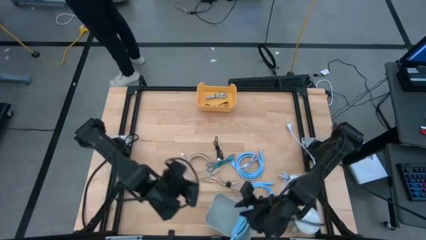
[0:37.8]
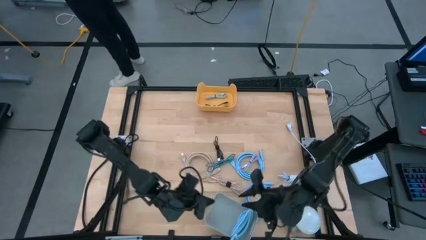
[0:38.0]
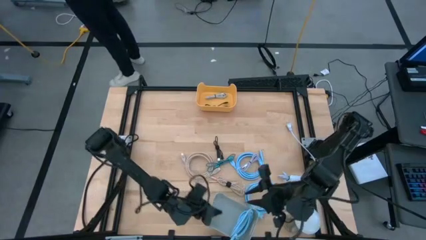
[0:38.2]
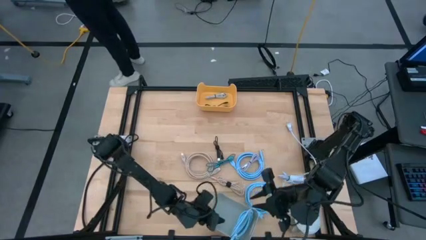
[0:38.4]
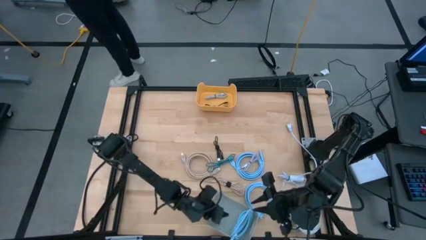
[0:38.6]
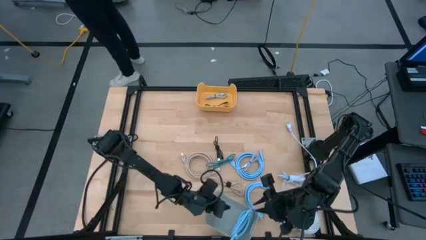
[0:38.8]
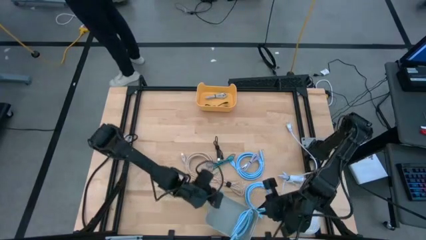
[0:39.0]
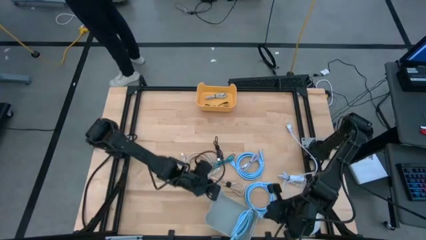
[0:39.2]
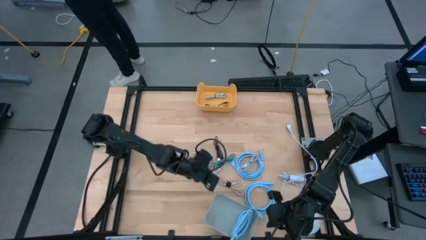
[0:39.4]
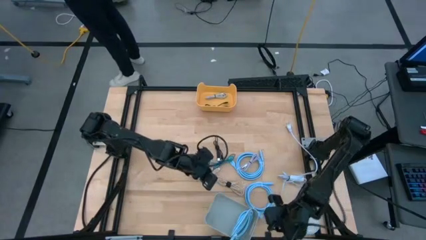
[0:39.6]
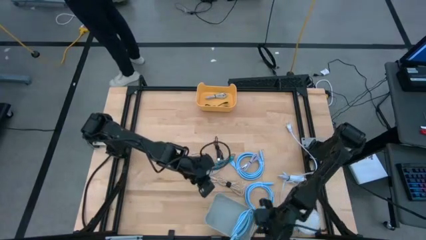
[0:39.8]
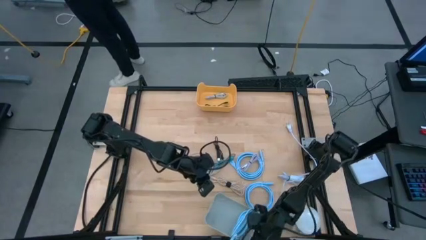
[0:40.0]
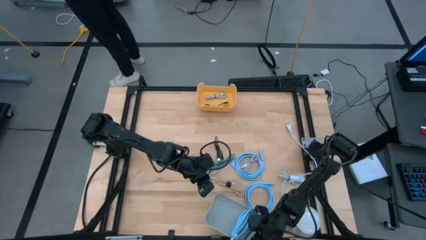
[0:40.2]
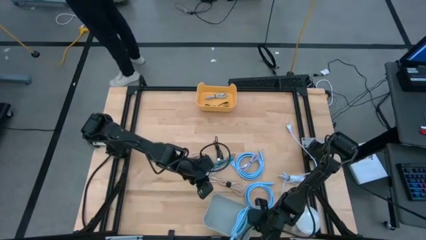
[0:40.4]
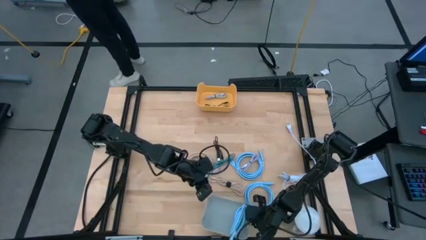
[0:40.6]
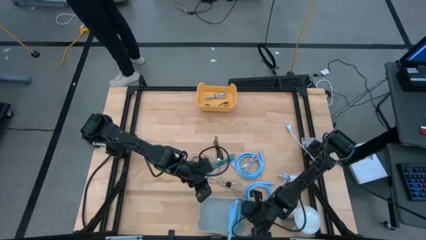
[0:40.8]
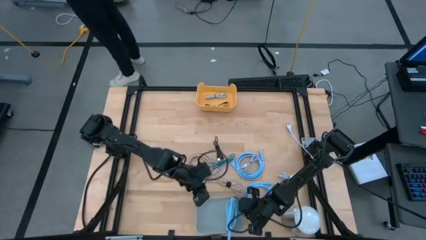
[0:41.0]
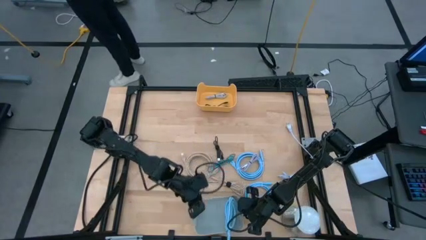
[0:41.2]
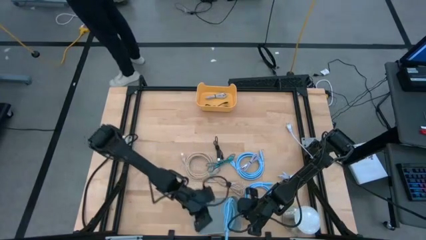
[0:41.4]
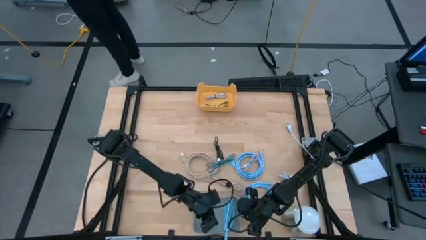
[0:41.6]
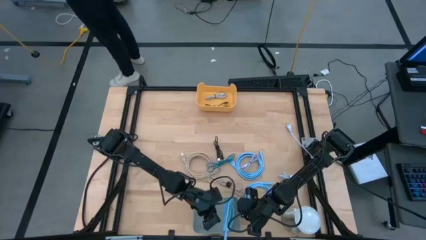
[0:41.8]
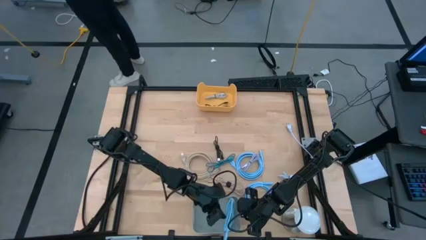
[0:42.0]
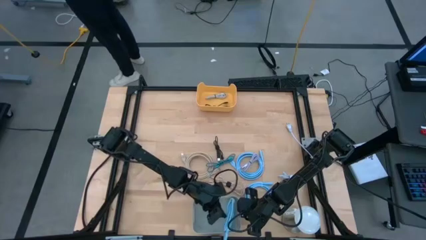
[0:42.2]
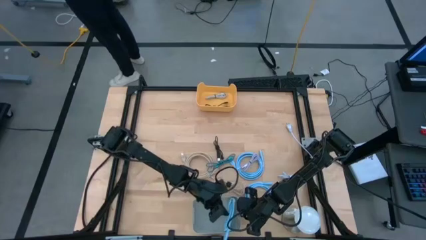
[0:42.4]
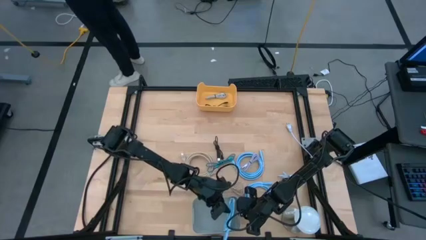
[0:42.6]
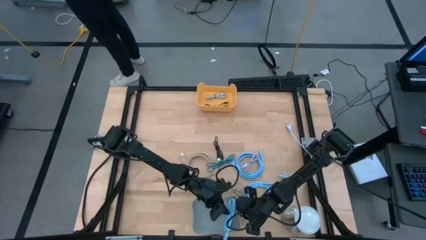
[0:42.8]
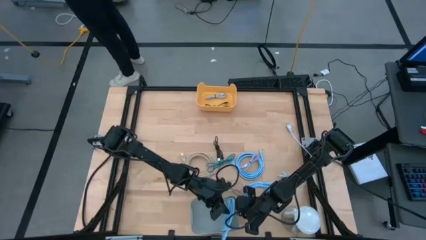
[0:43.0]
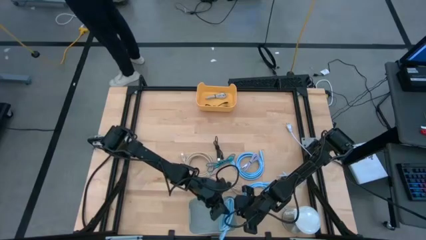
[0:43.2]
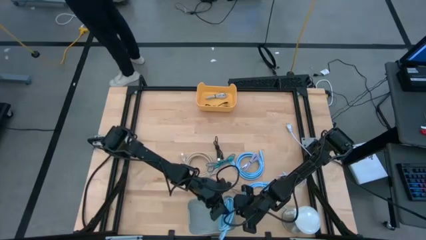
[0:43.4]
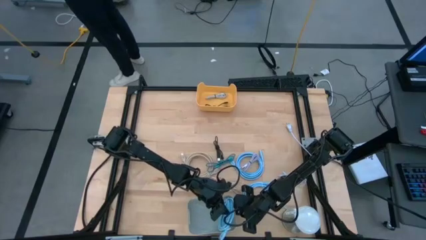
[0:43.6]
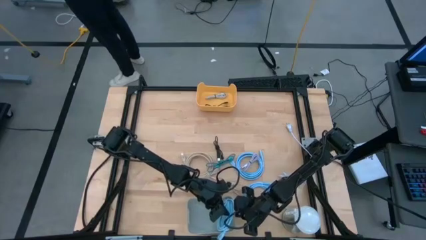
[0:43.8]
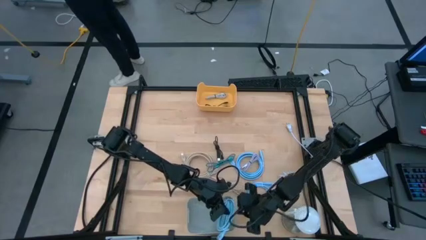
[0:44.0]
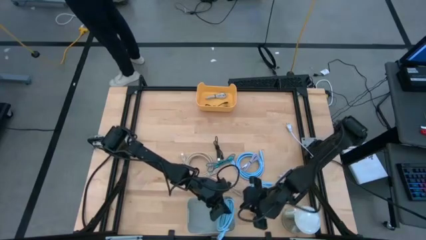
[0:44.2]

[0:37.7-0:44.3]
Task: Sort cables into bins
Adjust the gray bin

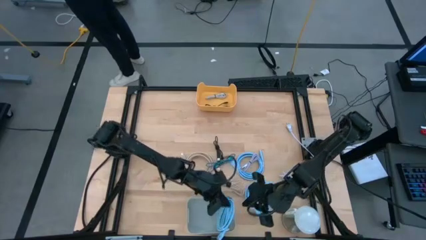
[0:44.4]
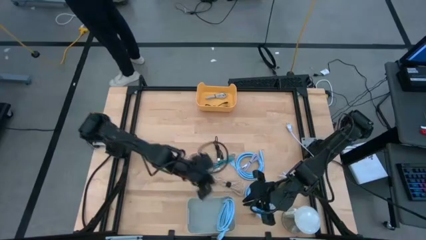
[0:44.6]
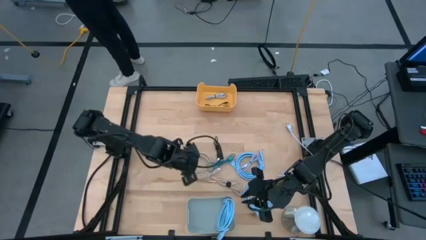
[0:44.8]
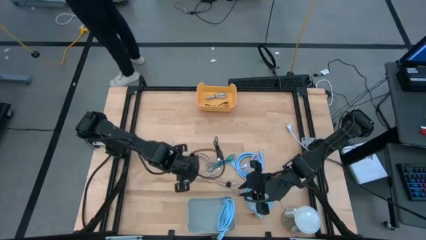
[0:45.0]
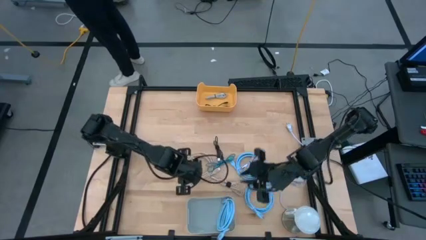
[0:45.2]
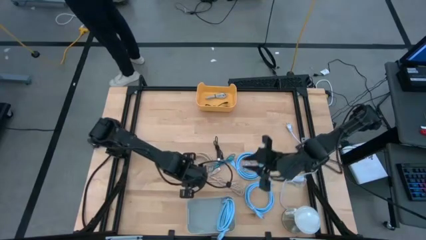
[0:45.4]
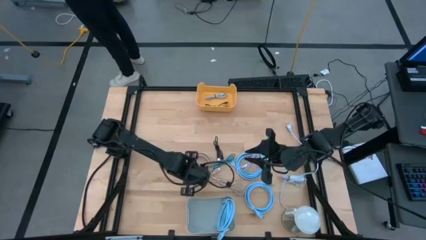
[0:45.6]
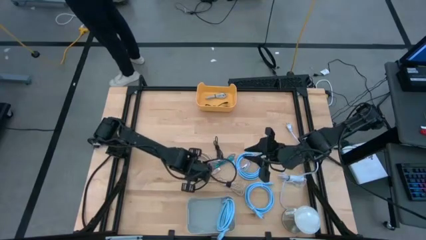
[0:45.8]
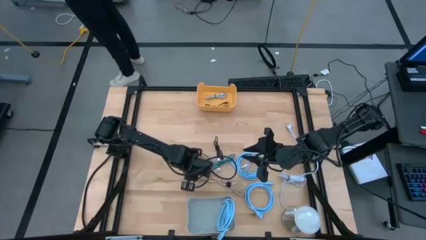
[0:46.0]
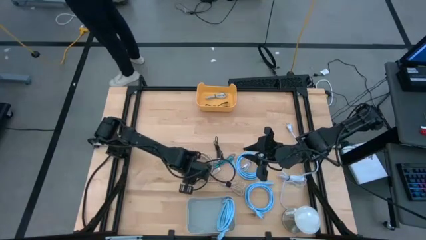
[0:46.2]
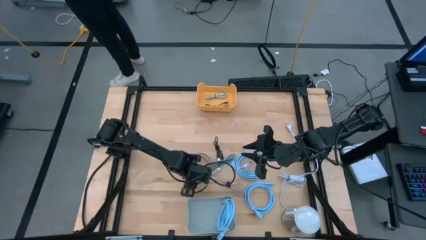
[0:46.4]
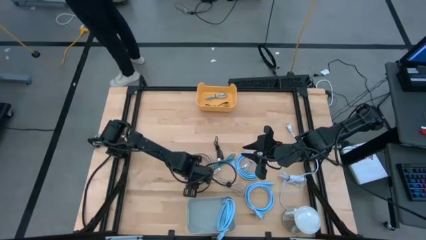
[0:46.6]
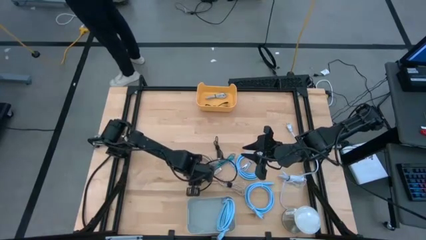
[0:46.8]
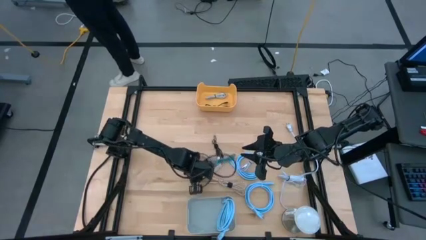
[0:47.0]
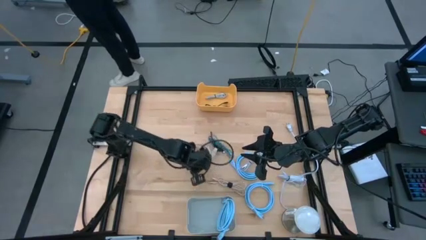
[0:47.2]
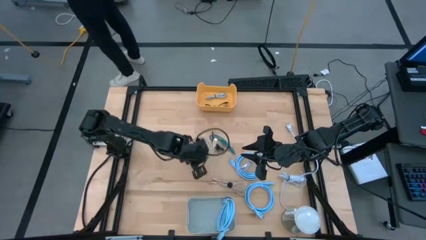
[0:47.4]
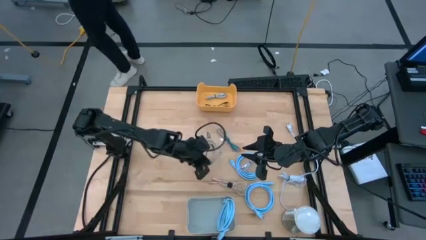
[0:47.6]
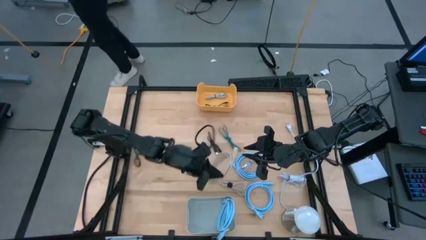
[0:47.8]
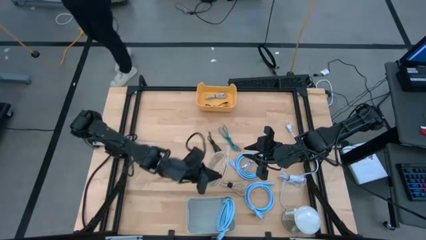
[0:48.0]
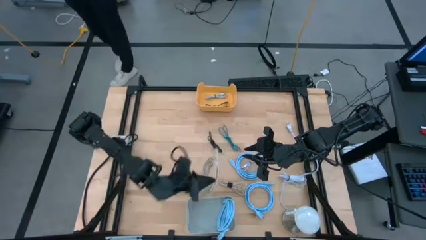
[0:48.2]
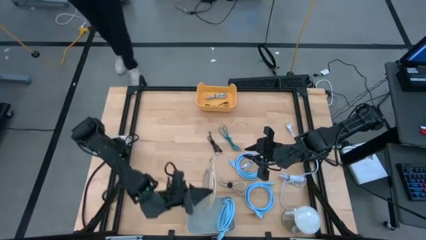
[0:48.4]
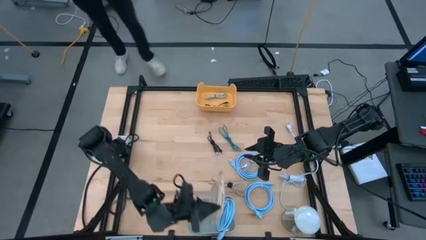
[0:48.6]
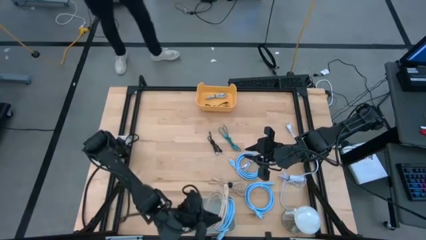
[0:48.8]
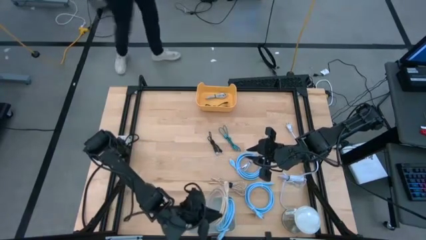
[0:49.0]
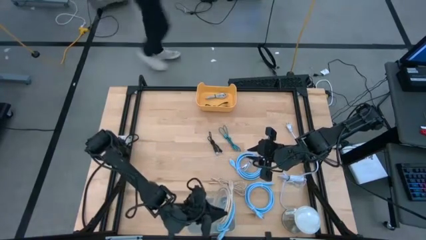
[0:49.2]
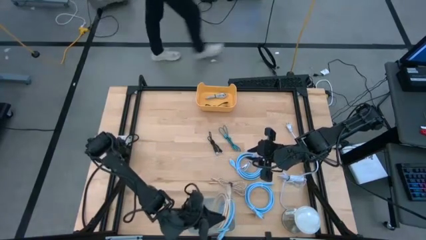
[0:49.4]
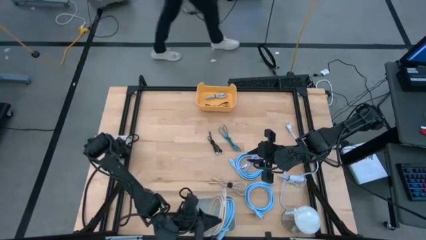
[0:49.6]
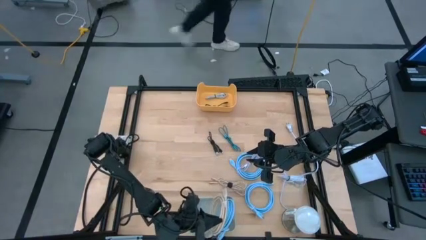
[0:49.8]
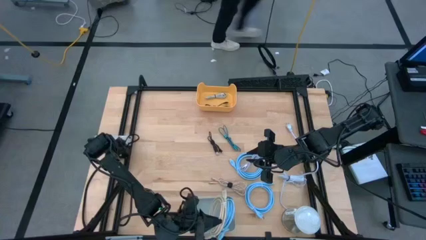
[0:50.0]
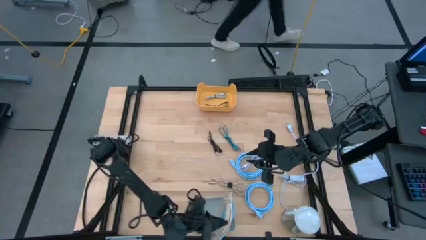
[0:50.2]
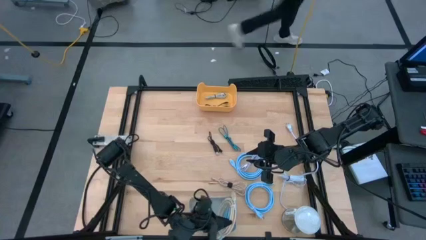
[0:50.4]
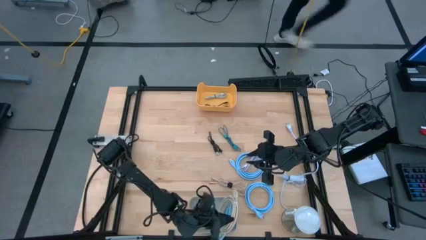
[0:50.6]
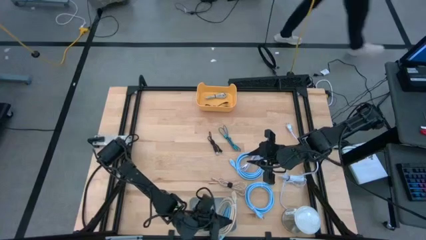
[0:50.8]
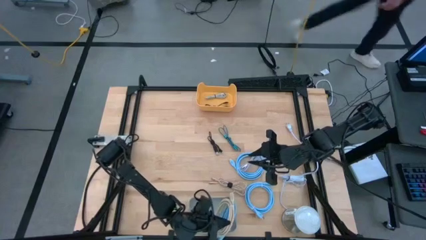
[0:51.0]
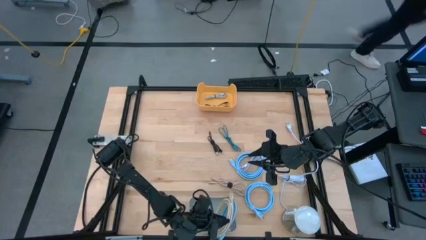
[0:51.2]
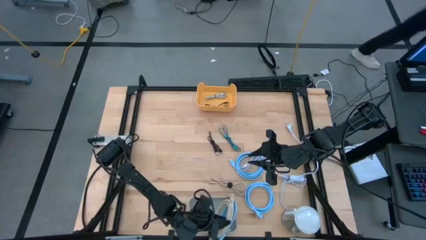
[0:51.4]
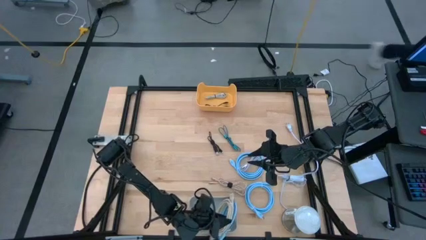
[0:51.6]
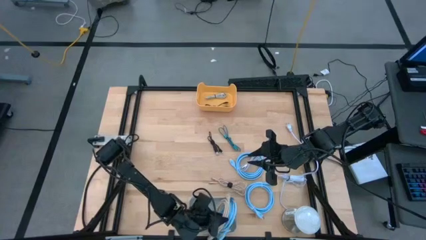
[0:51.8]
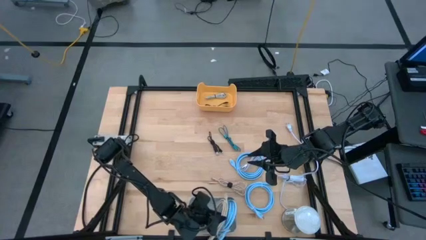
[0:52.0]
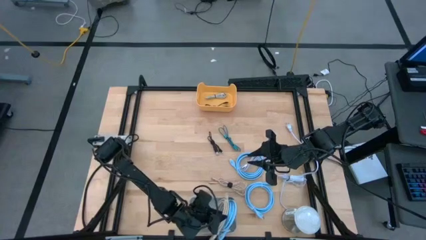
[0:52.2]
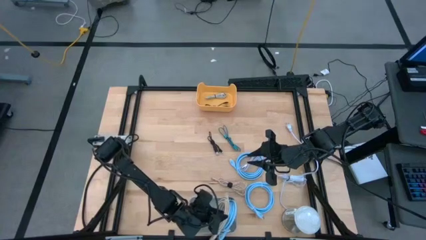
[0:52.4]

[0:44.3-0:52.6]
Put the brown HDMI cable into the gray bin

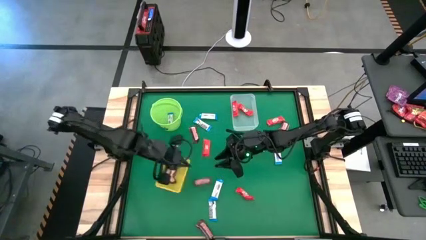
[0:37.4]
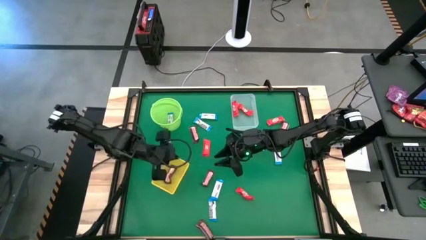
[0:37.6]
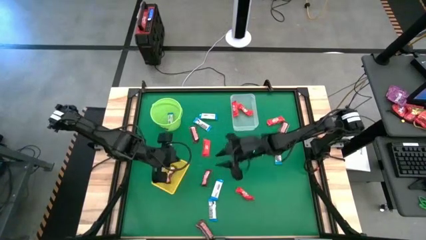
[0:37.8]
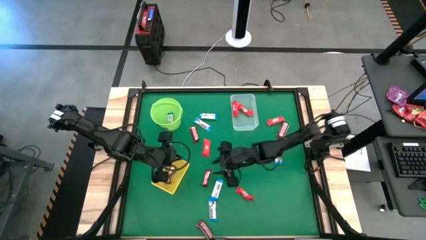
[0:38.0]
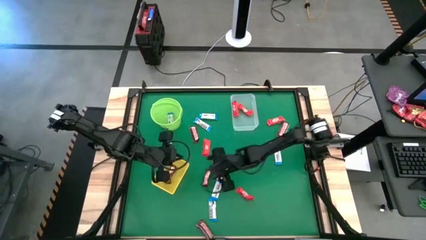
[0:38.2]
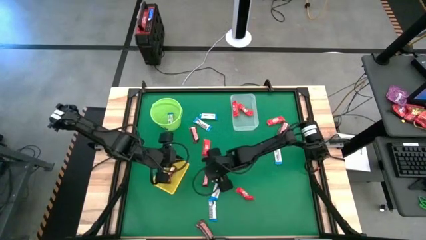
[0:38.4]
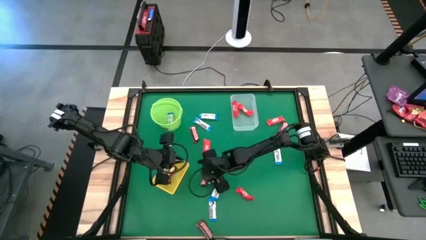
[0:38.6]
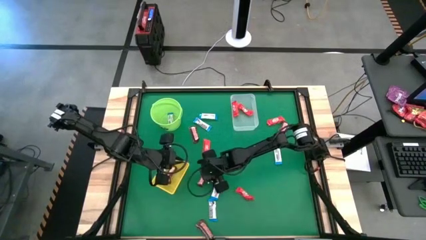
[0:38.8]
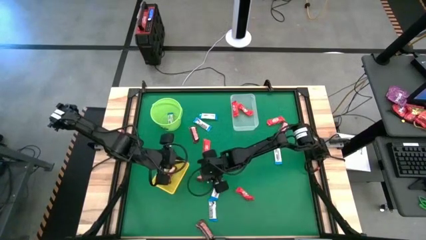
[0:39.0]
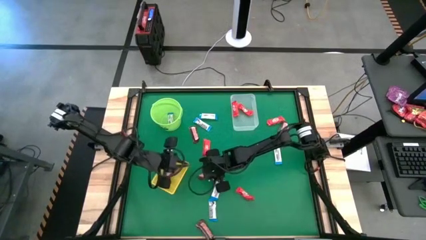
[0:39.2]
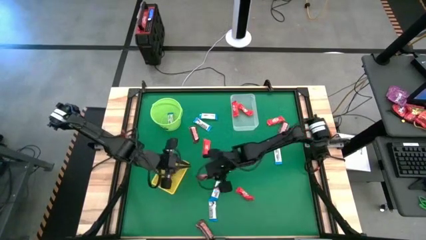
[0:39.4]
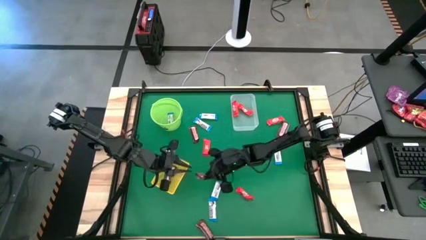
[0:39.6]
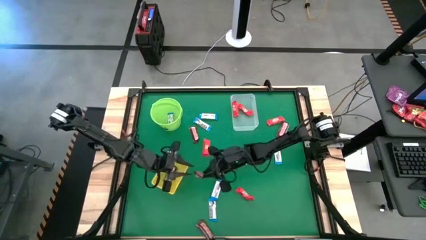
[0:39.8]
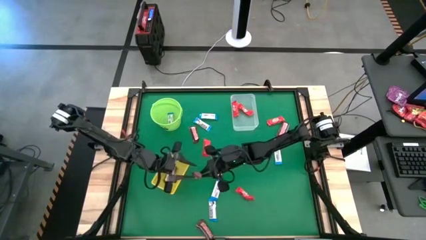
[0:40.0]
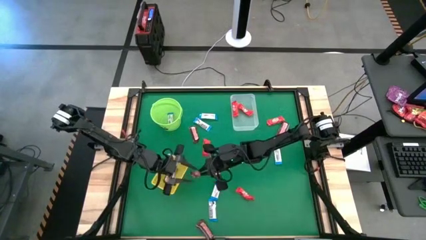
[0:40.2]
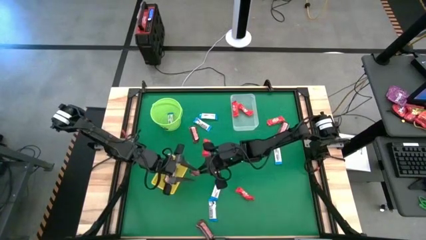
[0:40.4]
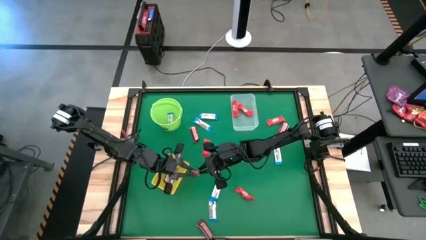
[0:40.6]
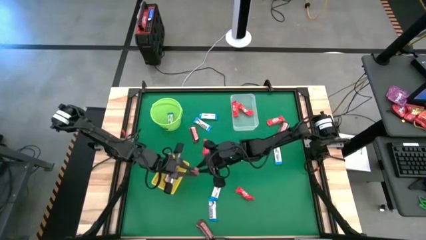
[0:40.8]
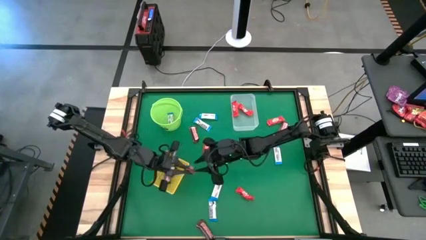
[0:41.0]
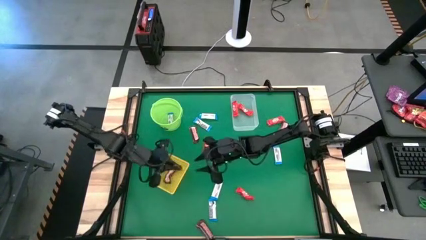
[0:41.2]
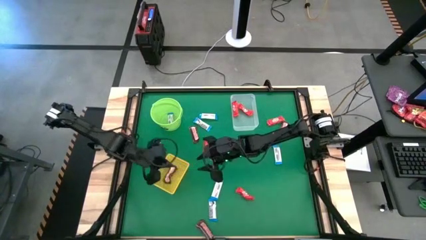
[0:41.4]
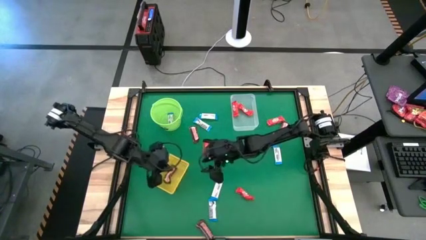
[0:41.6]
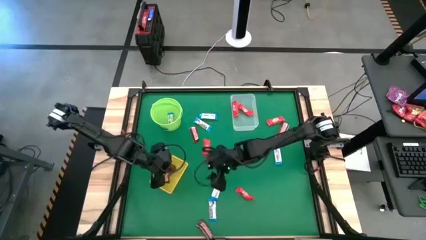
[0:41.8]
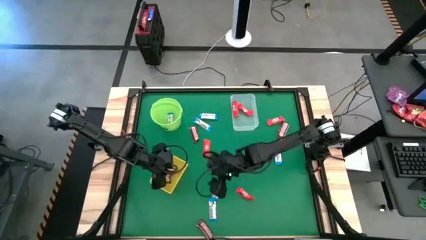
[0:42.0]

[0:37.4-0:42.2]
Task: Sort candy by brand, put in halloween buckets
Put the brown chocolate into the yellow bin
